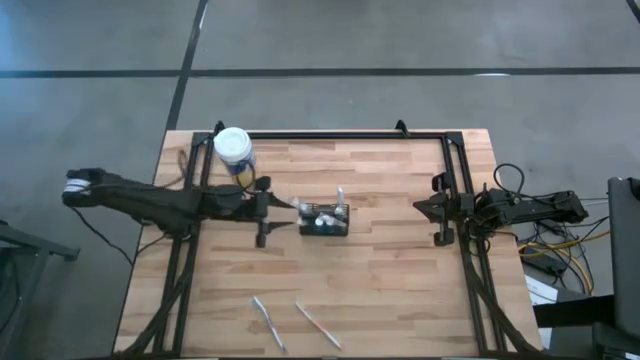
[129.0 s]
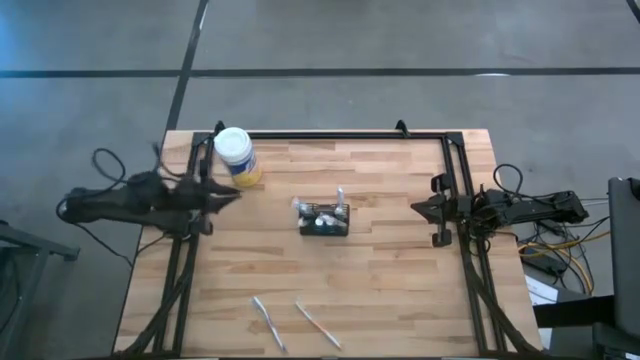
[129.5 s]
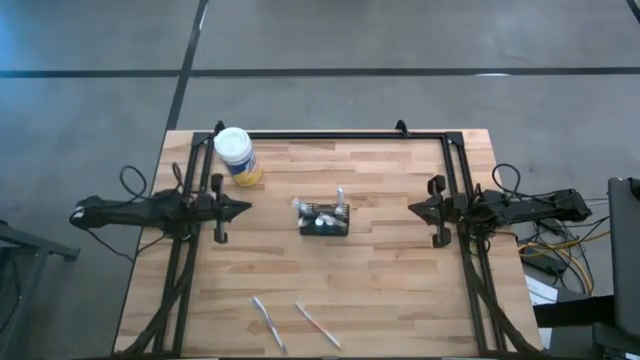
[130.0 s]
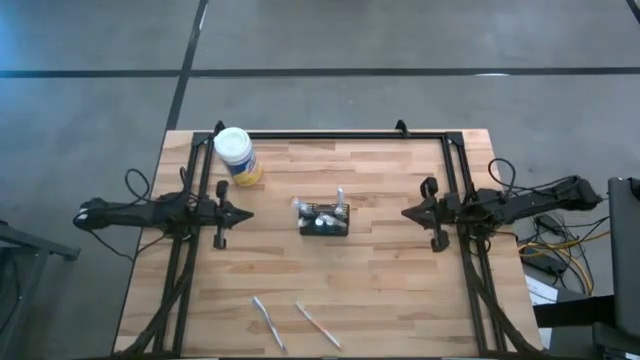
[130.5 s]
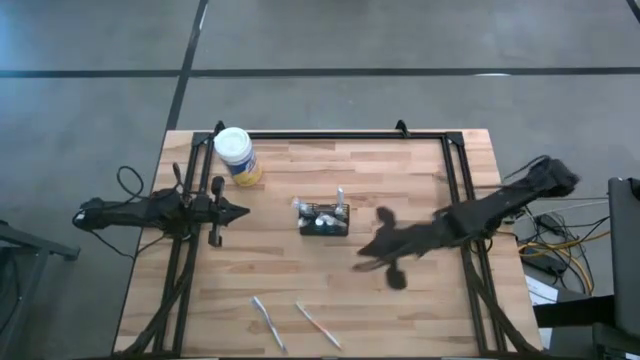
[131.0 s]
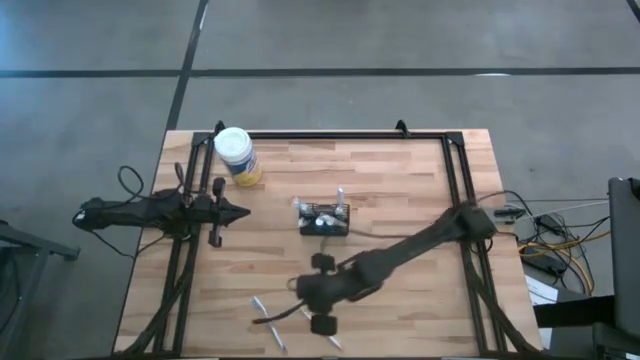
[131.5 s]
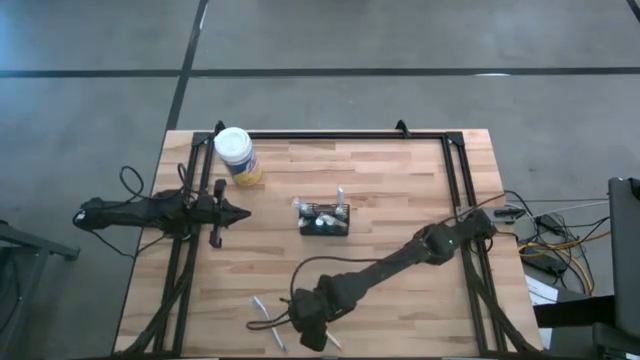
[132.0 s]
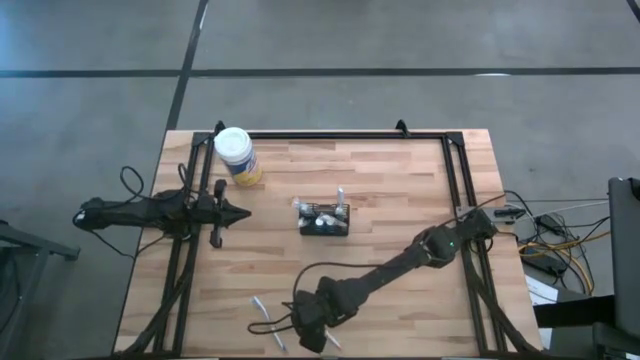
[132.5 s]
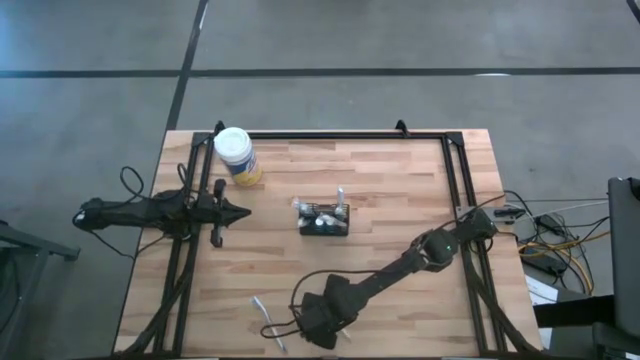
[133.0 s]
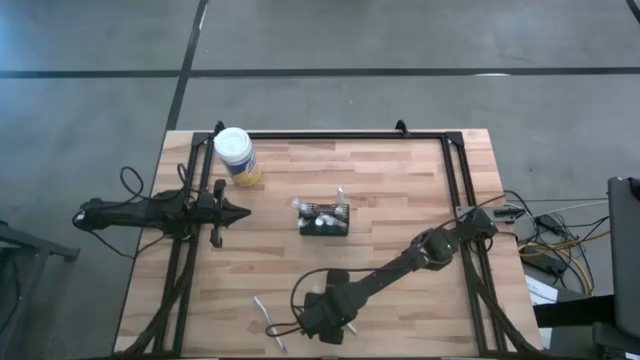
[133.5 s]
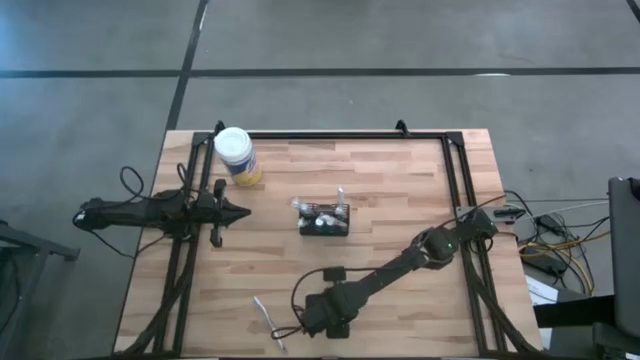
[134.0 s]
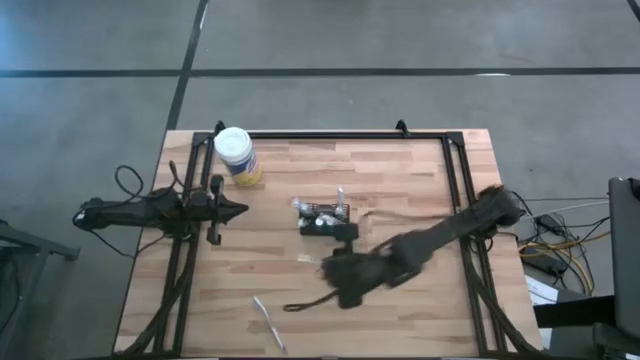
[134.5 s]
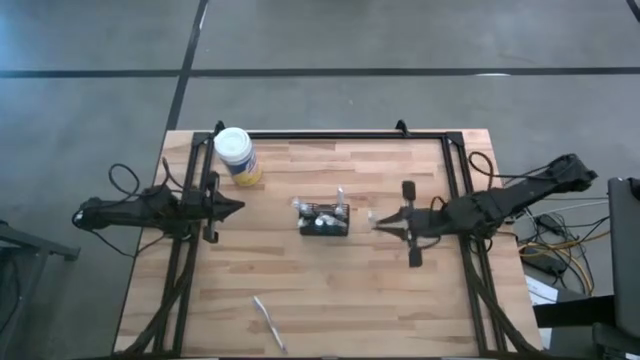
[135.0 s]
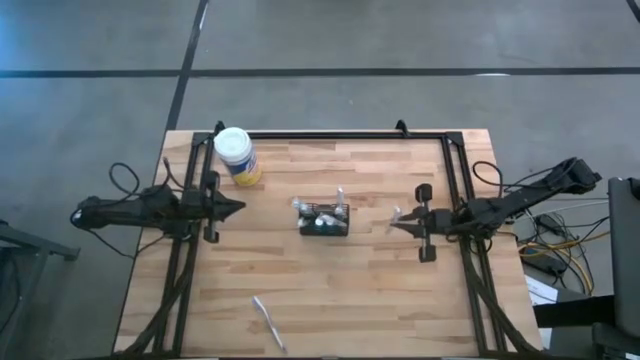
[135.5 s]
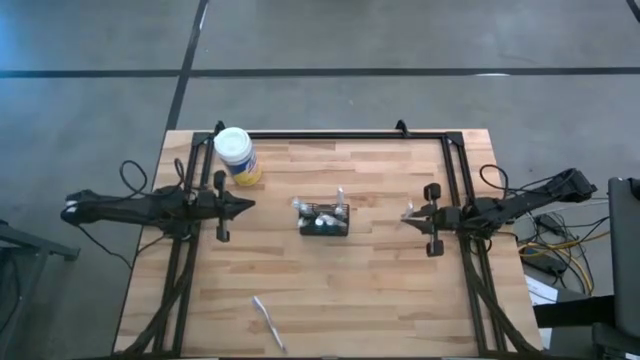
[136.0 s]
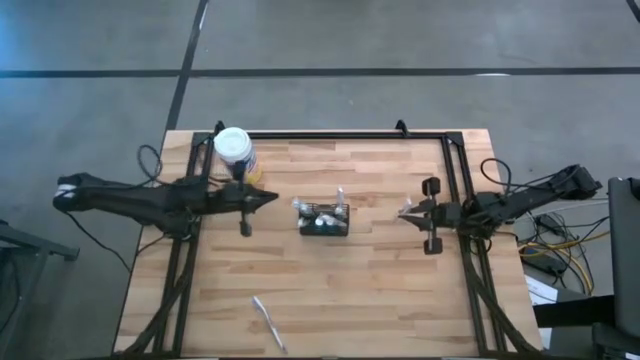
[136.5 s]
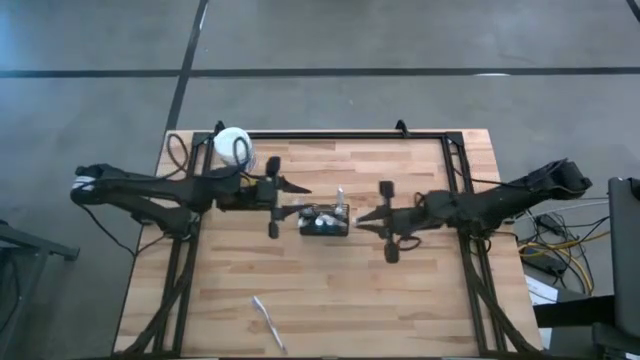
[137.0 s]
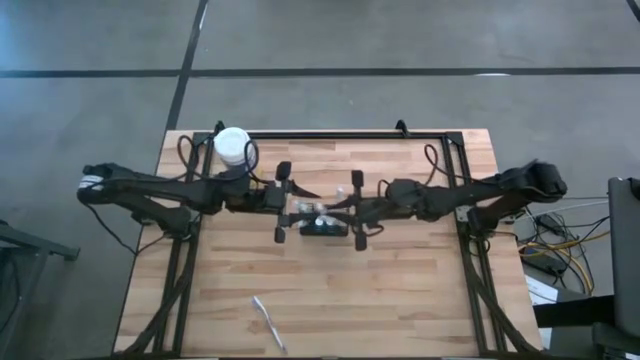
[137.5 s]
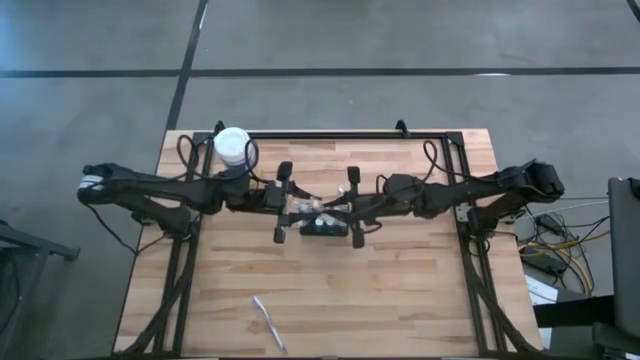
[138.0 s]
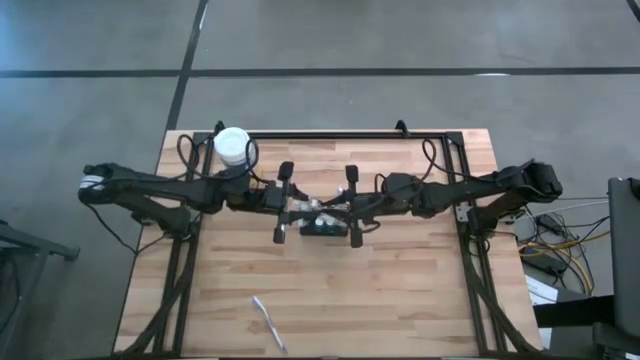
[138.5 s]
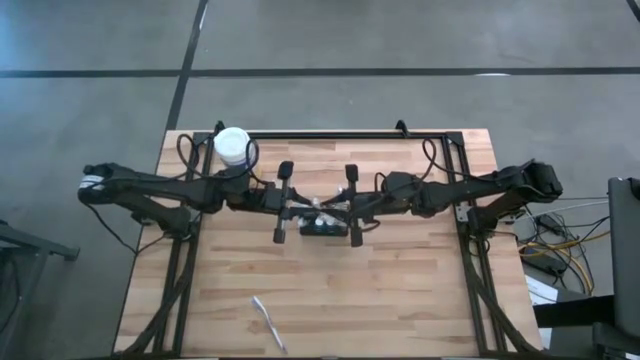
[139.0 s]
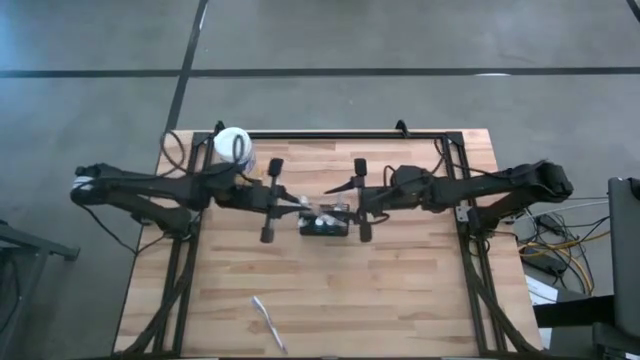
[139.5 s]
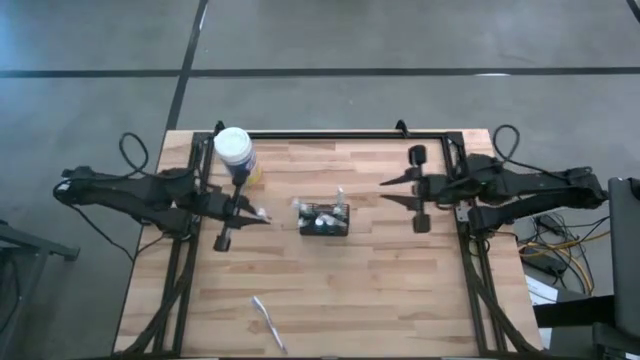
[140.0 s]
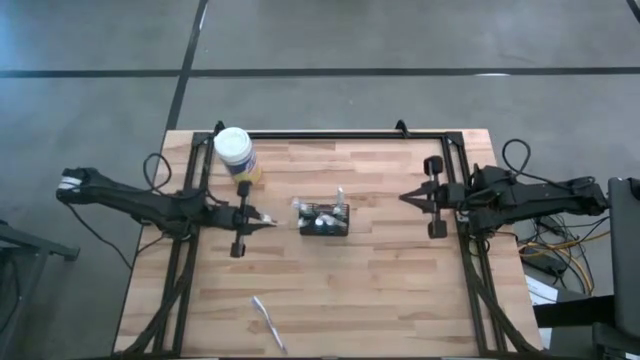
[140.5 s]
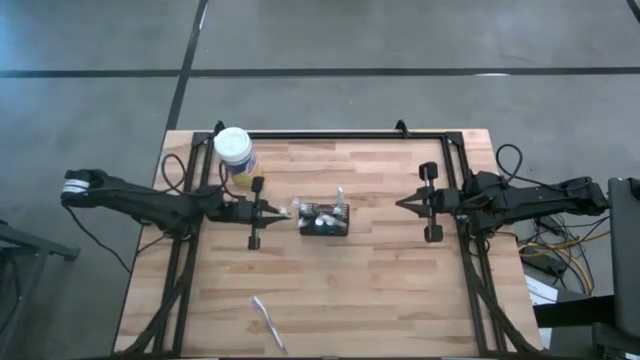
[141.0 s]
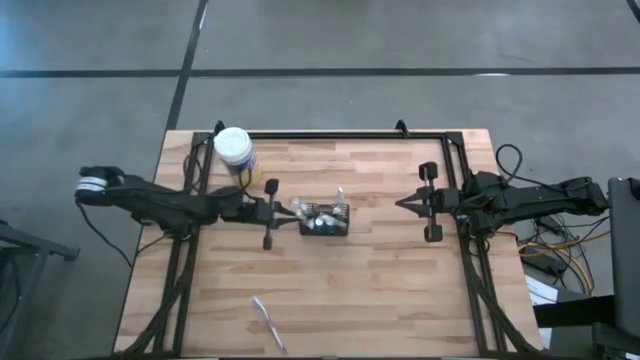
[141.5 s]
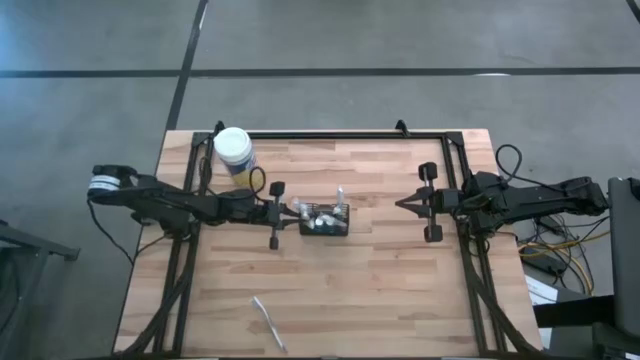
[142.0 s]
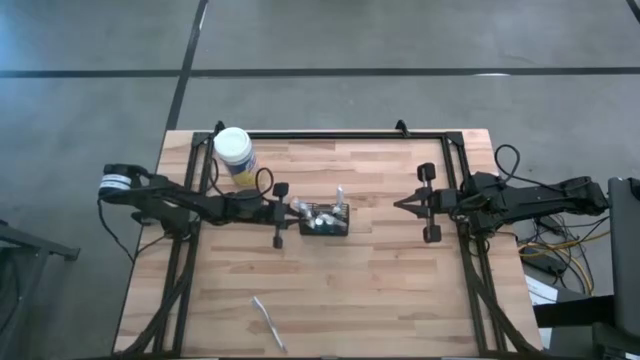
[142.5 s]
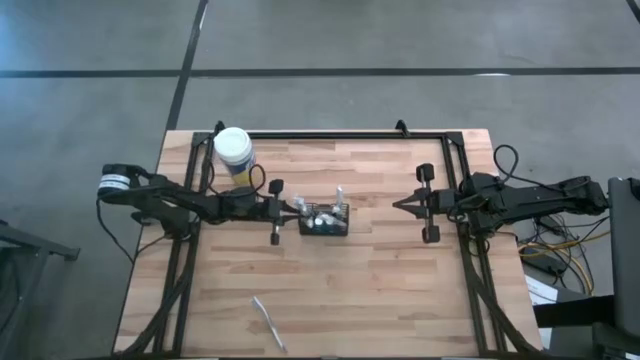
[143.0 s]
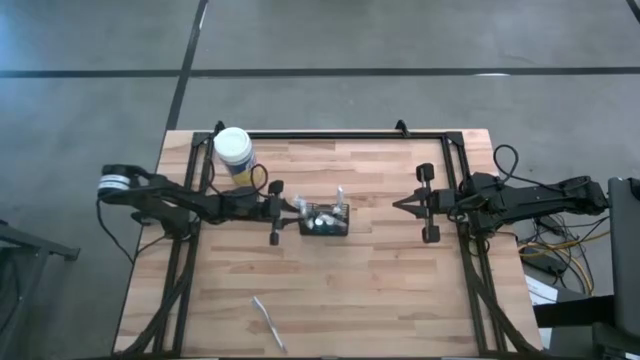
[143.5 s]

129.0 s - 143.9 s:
Task: Pick & Place toothbrushing station
Put the orange toothbrush into the mesh organizer

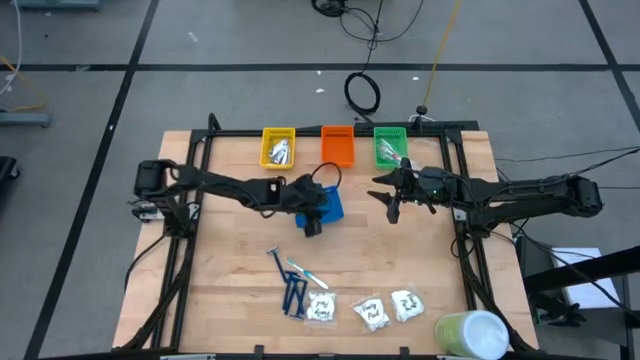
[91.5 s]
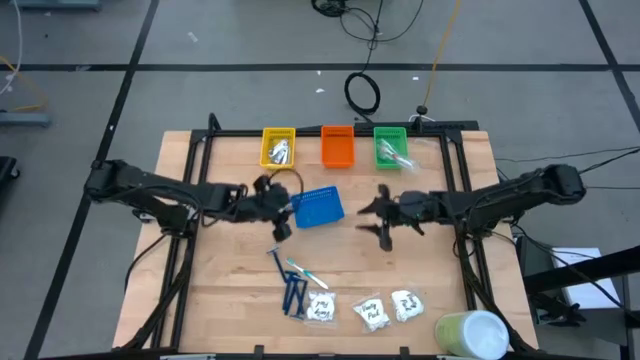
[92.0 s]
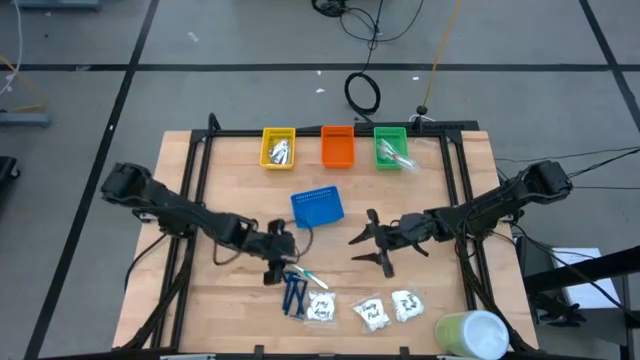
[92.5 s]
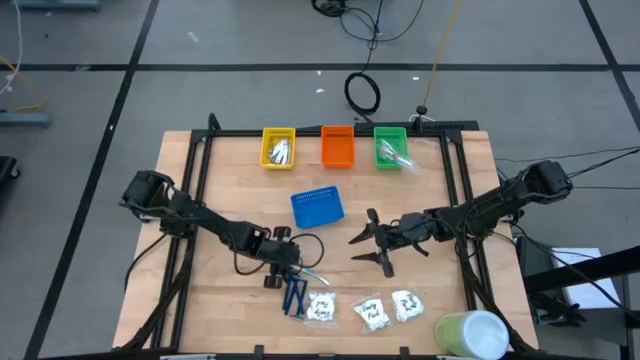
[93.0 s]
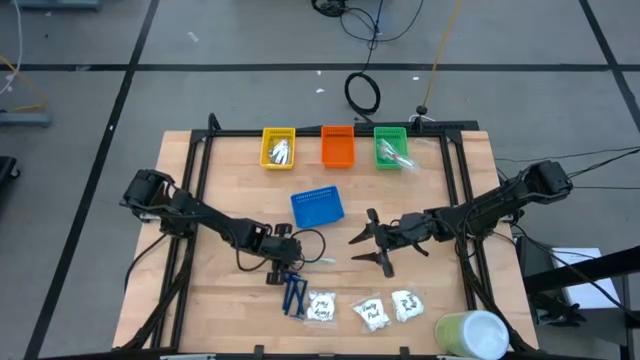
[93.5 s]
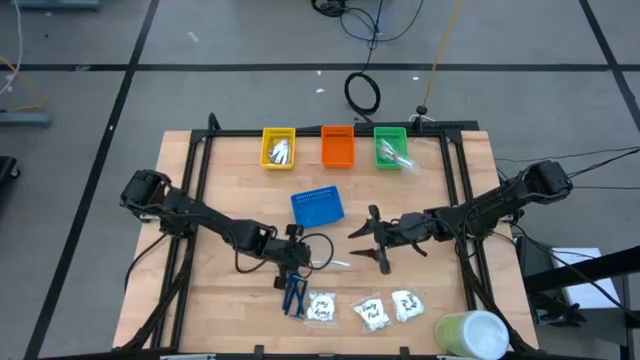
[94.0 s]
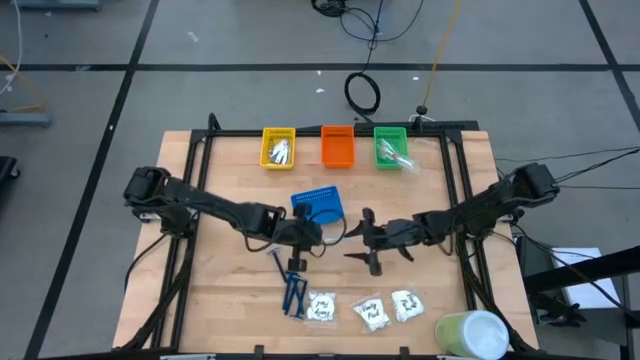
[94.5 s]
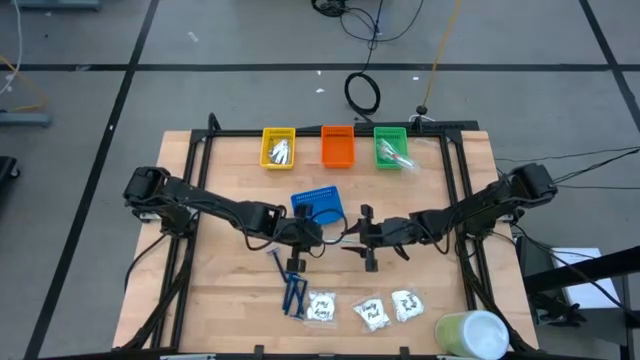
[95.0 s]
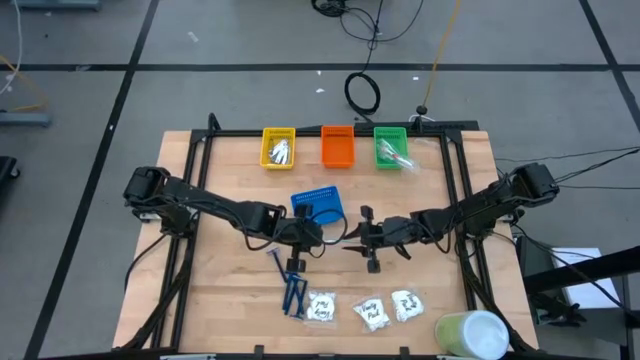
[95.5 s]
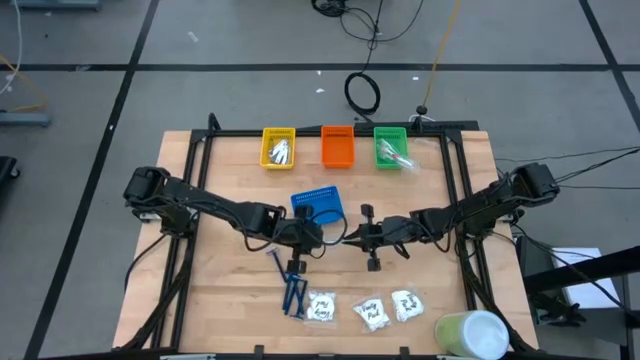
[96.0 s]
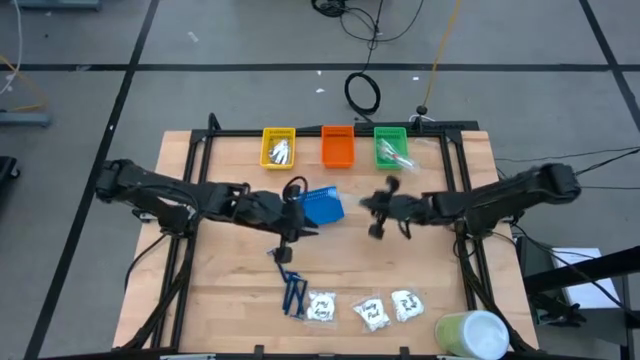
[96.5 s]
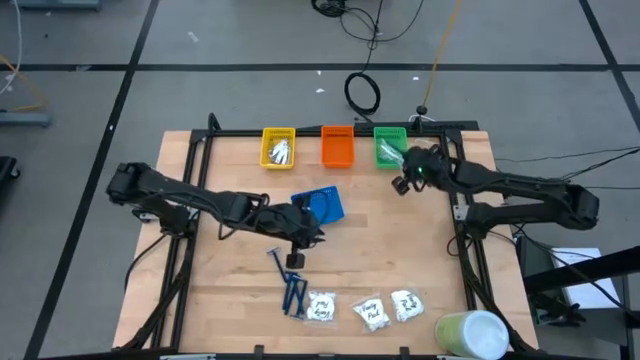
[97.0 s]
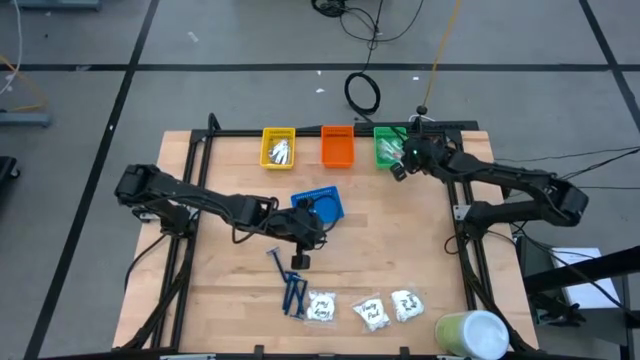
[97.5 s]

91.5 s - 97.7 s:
Task: Pick & Place Travel size toiletries
Put the green toothbrush into the green basket

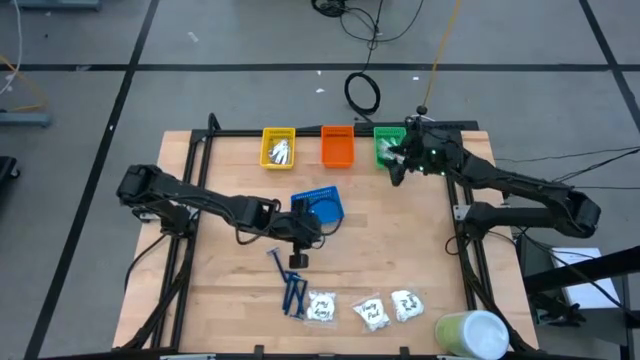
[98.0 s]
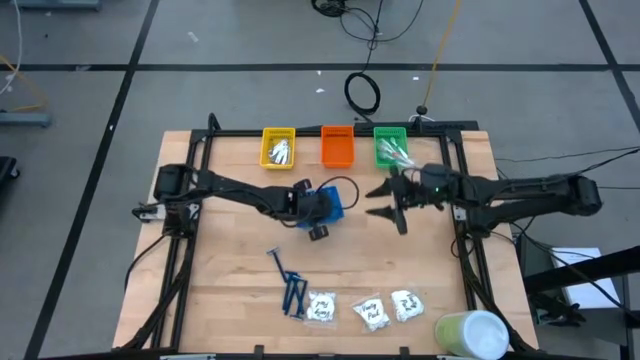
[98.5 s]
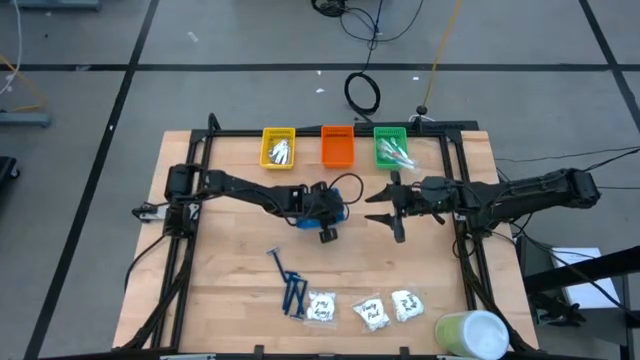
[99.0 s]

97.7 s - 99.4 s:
Adjust the blue basket on the table
